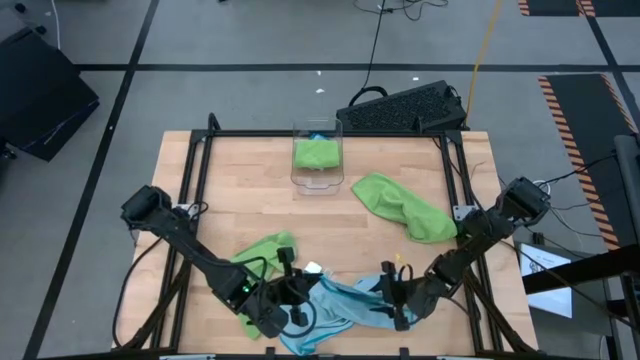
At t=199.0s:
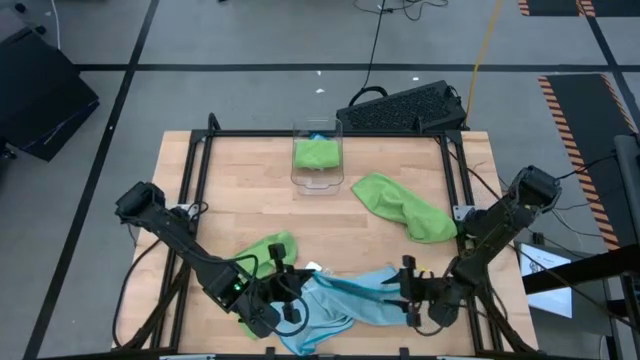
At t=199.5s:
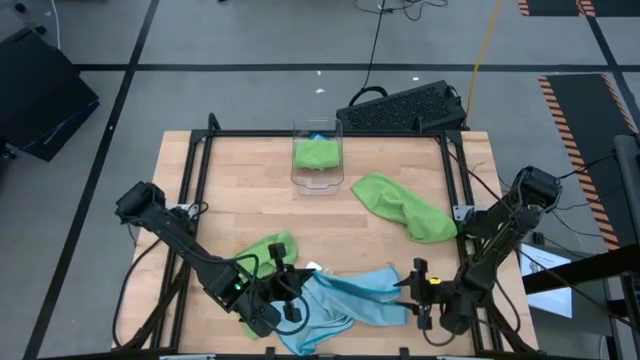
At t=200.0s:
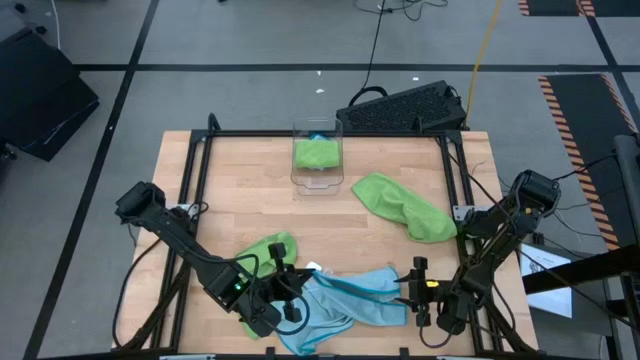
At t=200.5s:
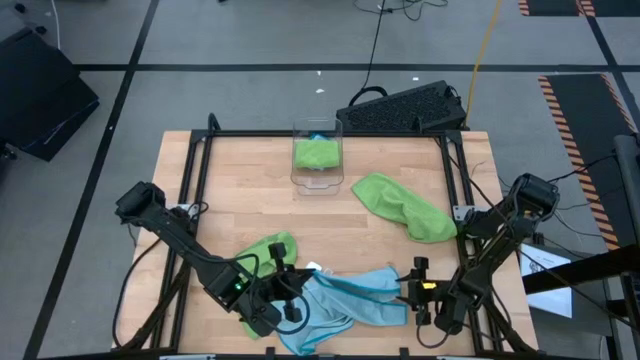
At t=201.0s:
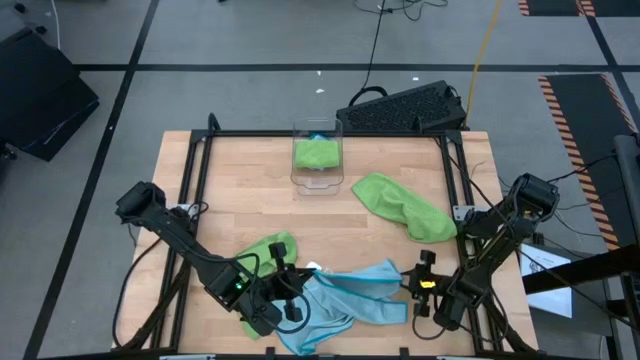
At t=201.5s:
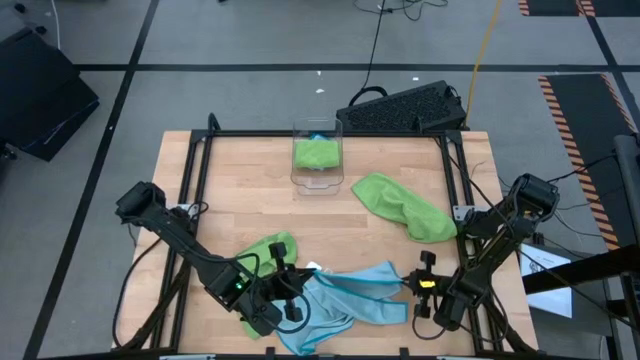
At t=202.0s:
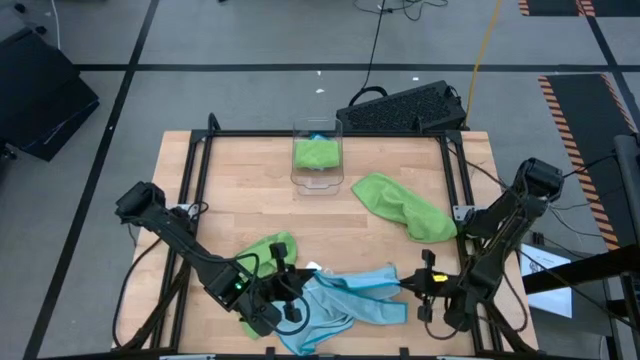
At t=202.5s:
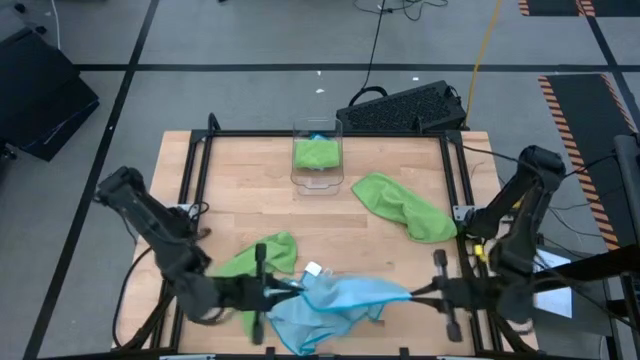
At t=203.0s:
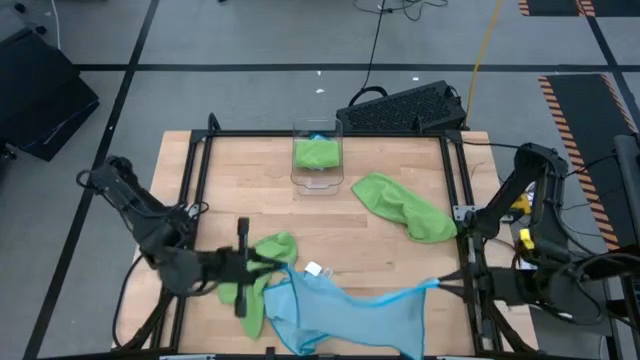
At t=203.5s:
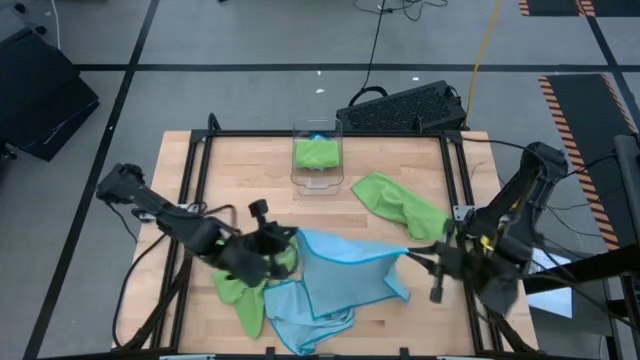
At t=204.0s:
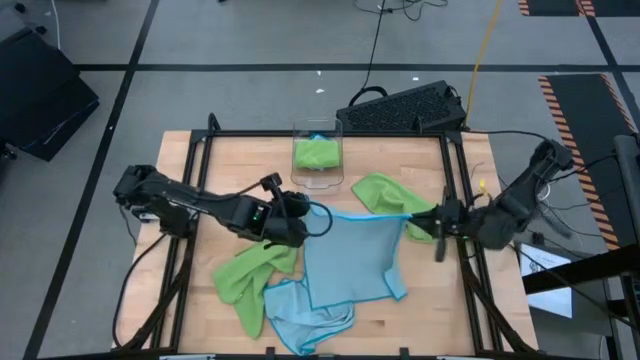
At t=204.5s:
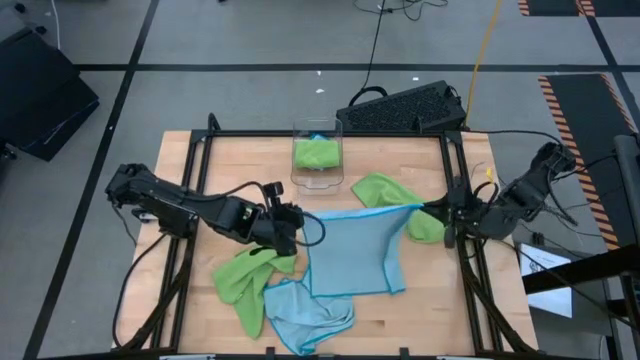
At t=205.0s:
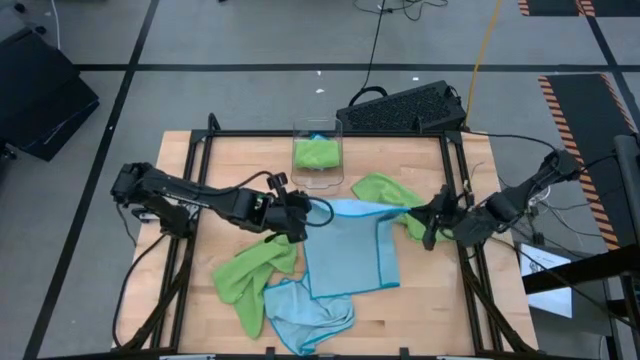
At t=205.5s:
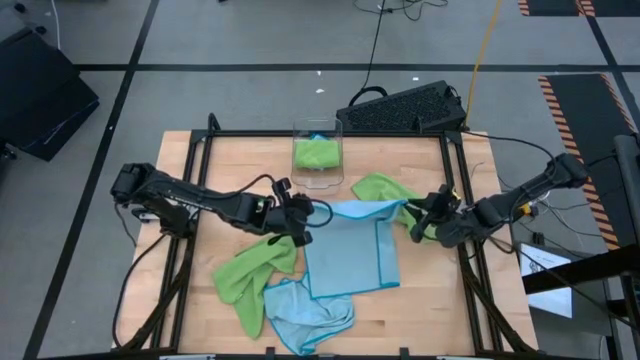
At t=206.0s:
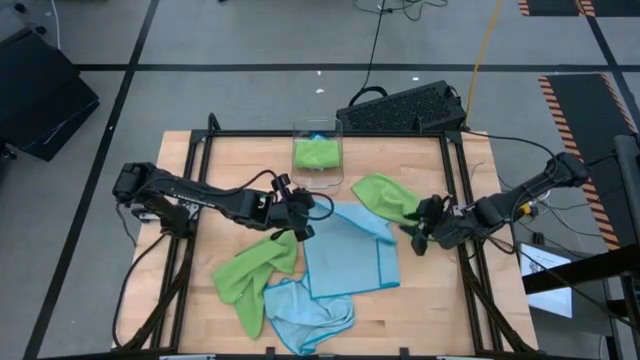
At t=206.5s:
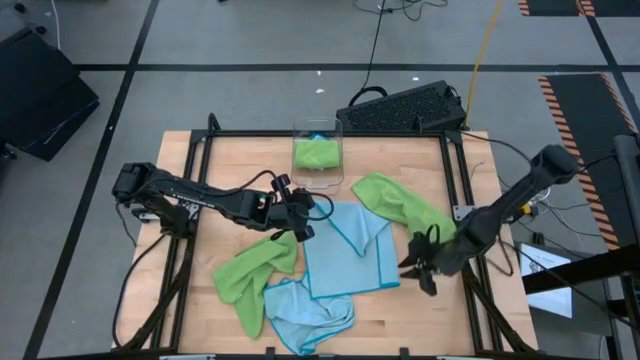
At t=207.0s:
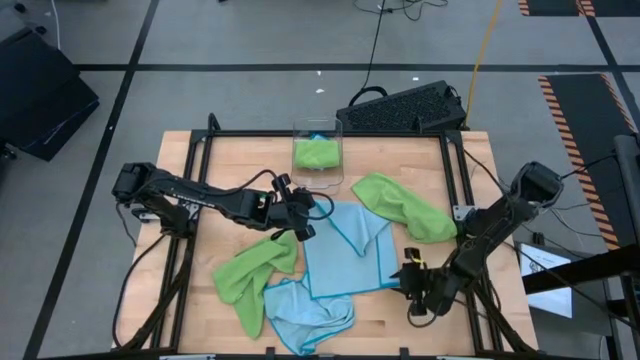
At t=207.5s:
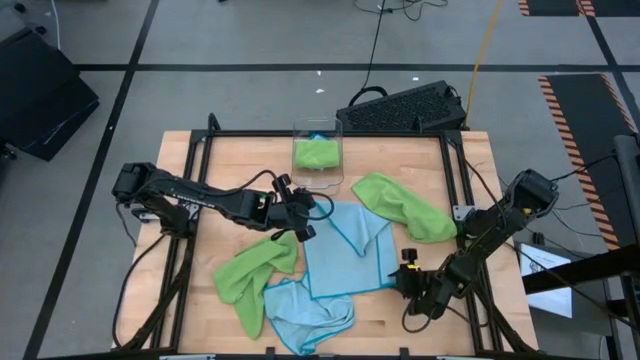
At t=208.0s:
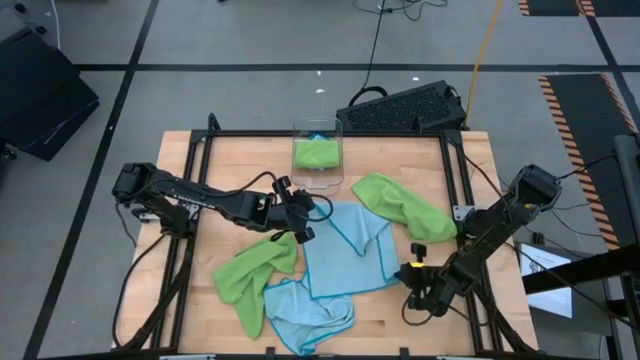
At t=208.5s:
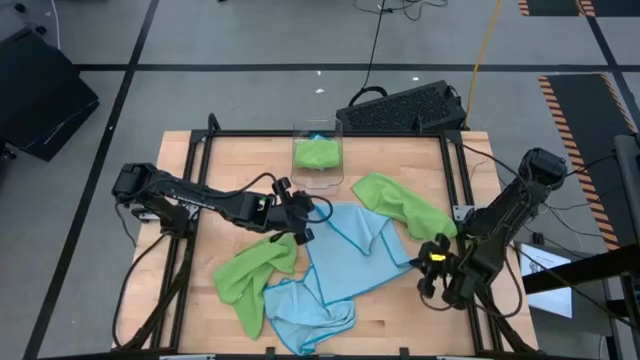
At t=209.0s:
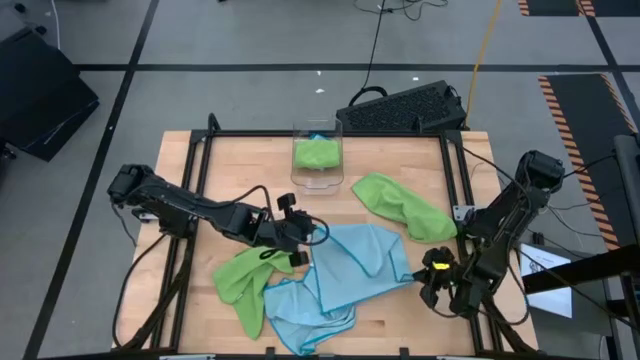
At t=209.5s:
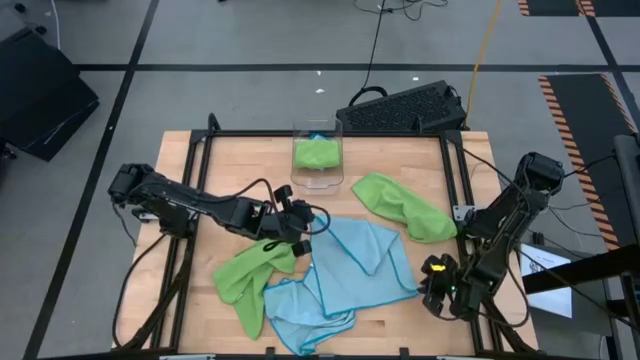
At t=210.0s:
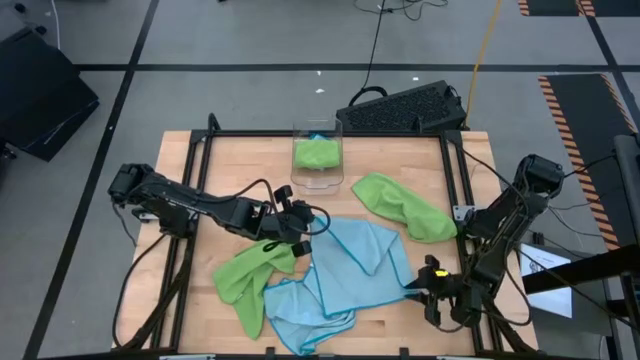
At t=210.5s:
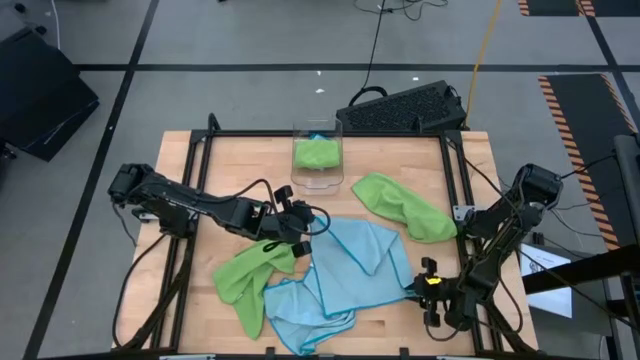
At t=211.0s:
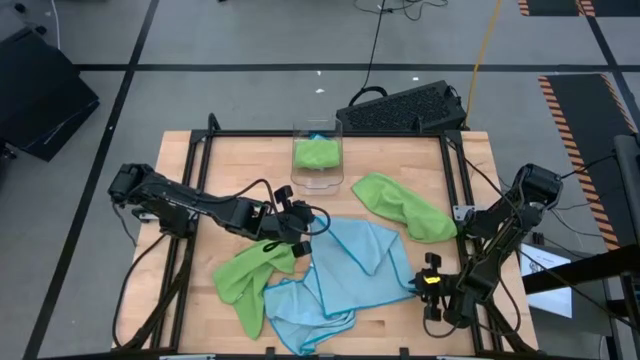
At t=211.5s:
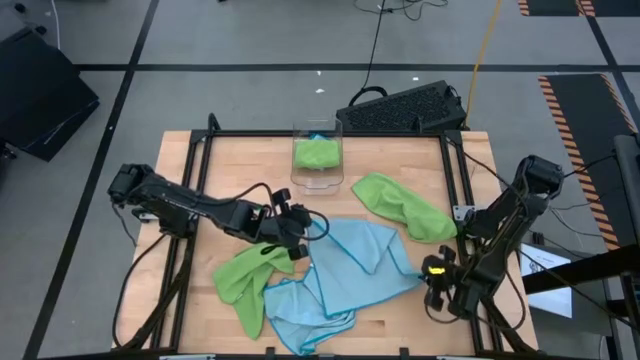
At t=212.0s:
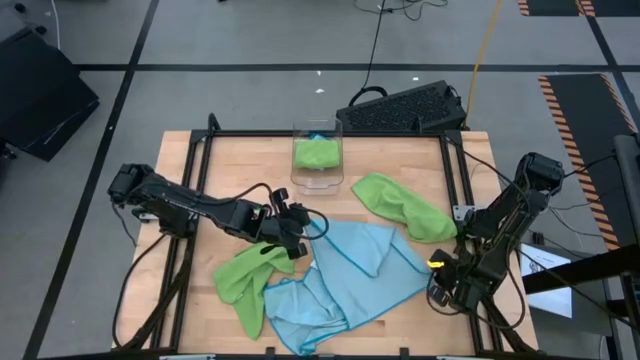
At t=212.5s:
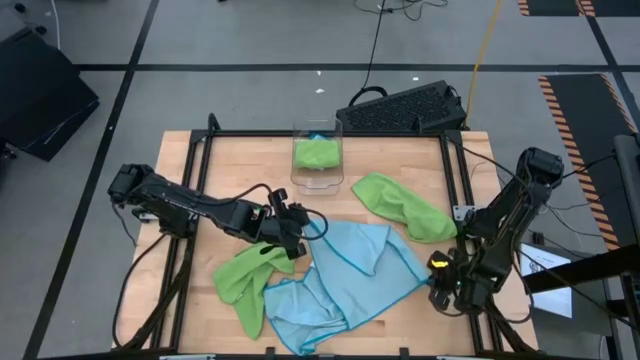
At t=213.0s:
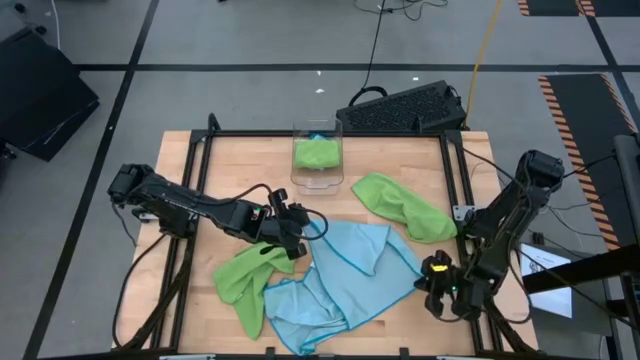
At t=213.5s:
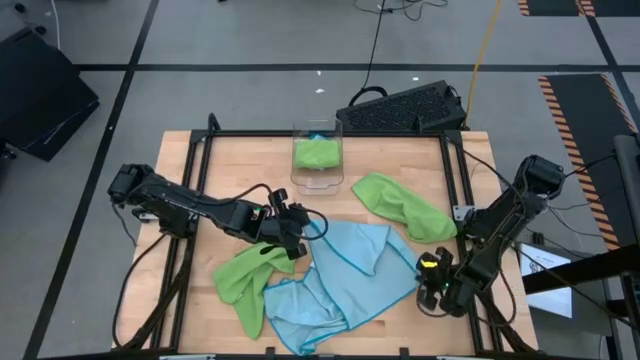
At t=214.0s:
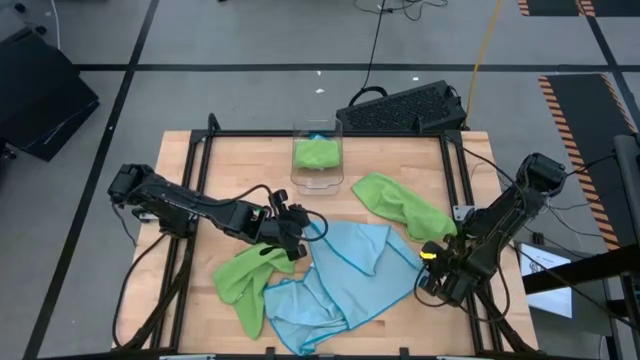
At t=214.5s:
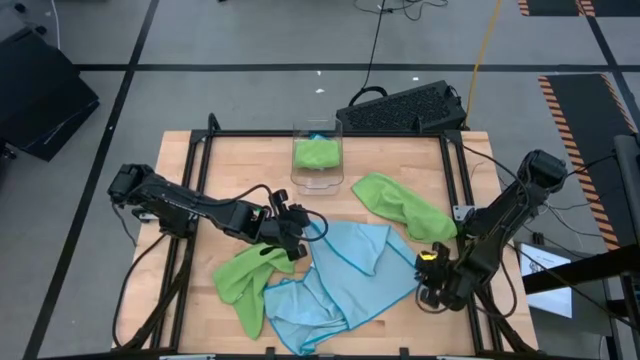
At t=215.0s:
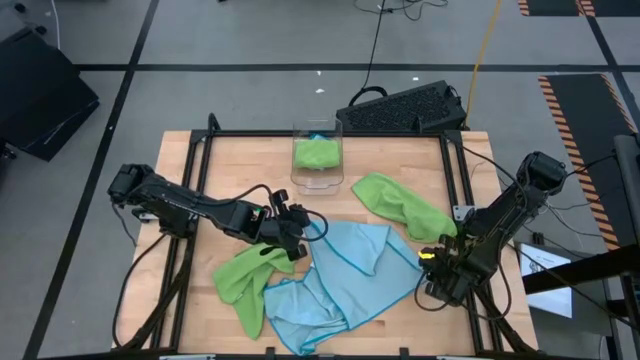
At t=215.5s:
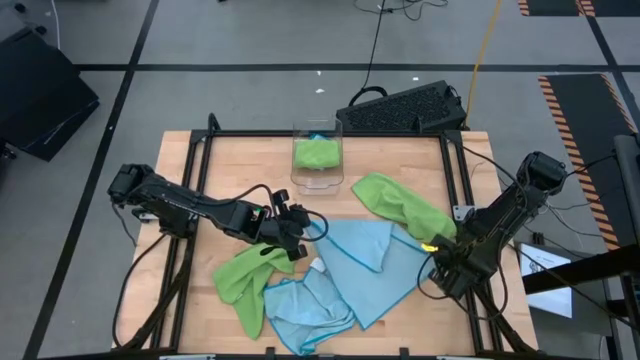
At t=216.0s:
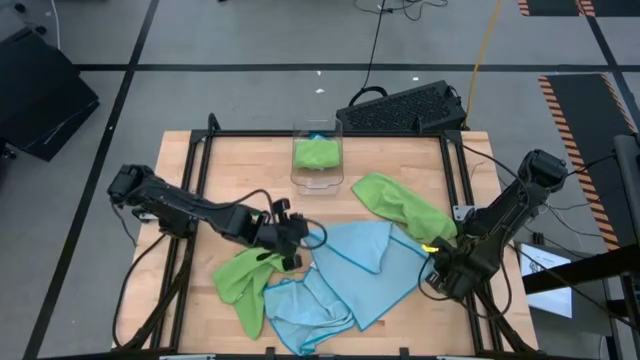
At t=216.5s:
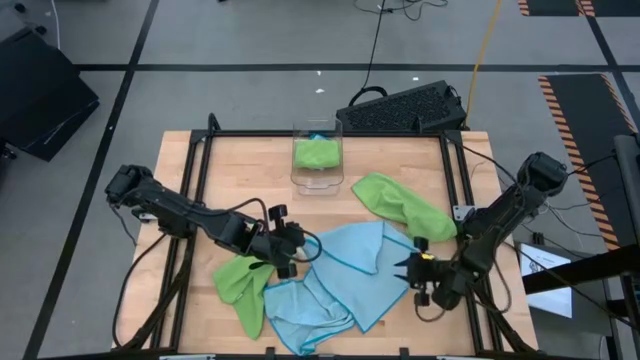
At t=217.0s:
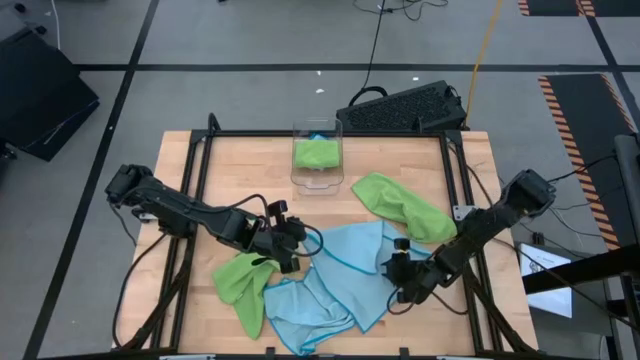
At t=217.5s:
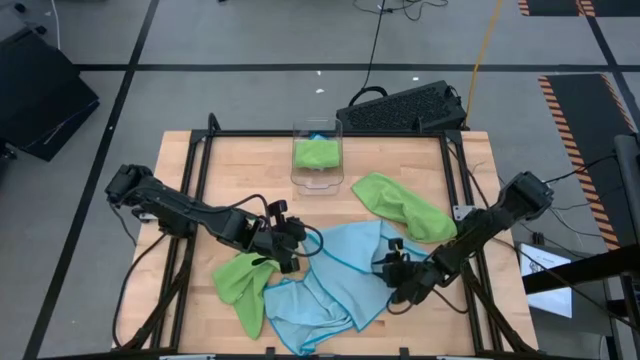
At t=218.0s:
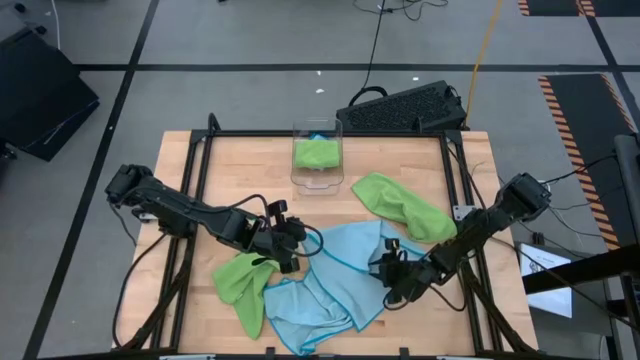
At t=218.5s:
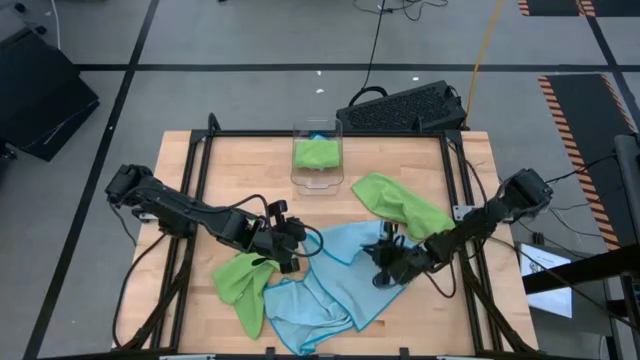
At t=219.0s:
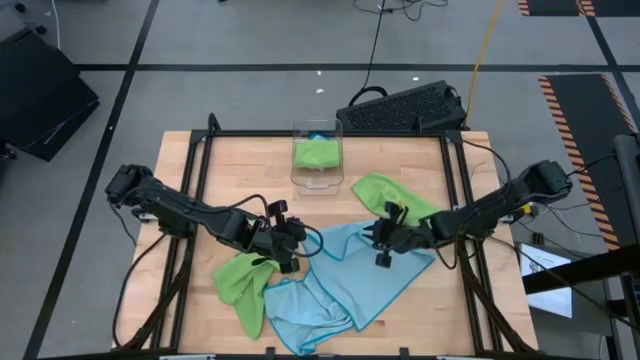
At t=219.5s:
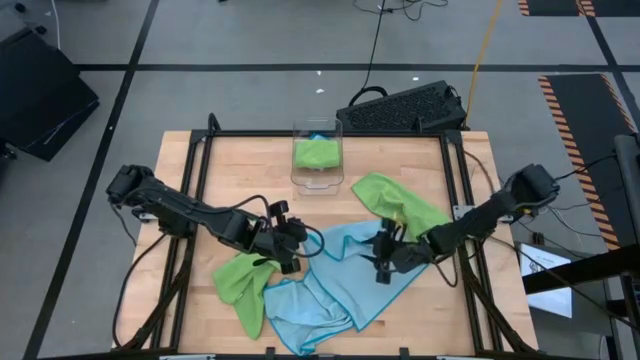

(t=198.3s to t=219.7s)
Task: Fold microfiber towels
Fold the right blue towel
